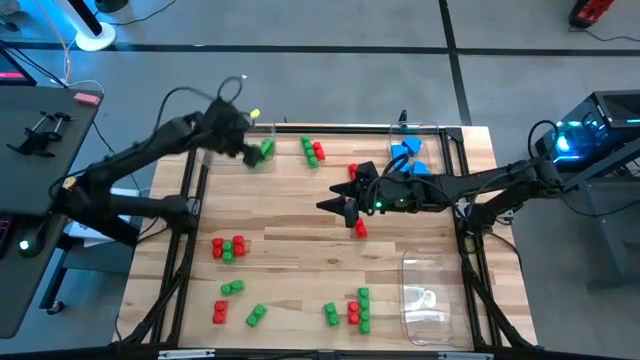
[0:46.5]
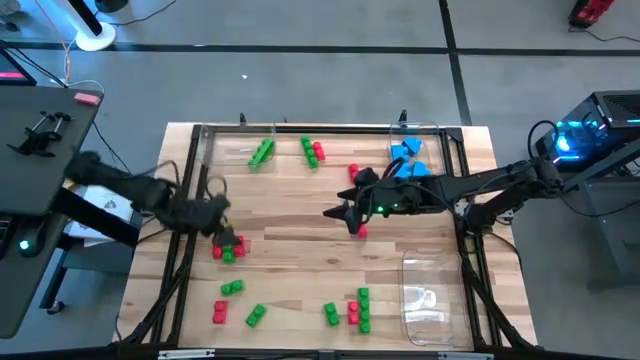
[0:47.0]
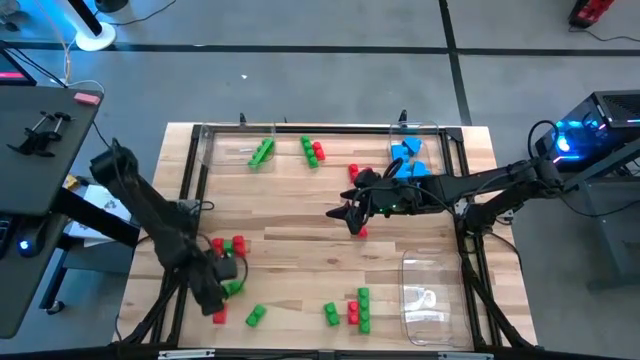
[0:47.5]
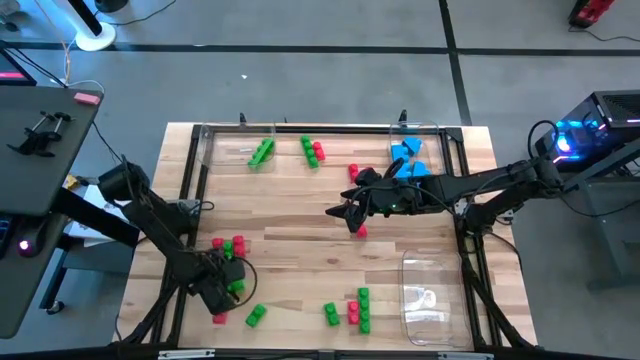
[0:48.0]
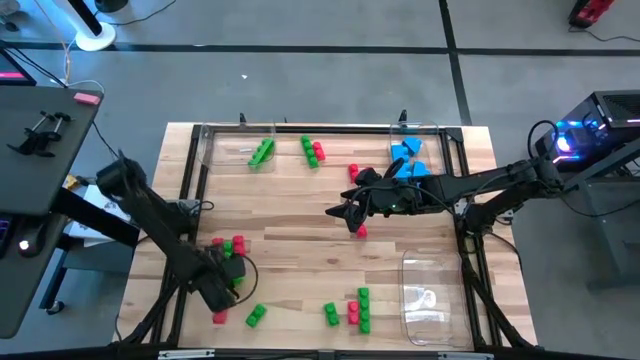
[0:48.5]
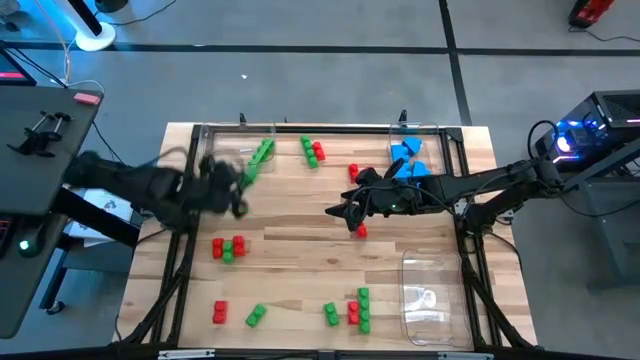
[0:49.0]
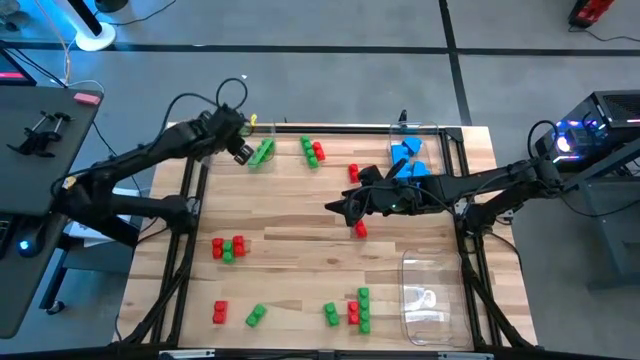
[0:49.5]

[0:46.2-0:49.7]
Task: Sort blocks
Put the green game piece into the top left transparent bin

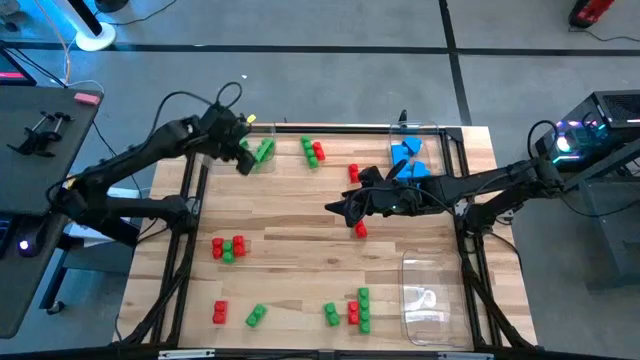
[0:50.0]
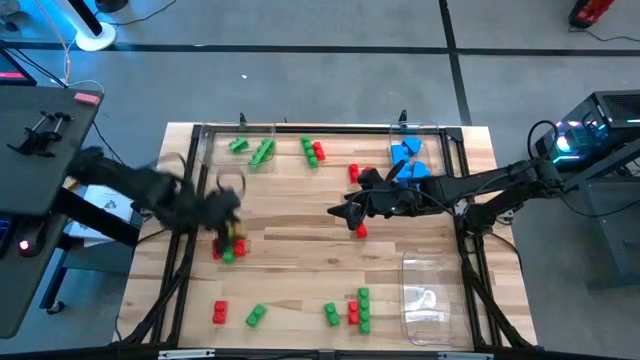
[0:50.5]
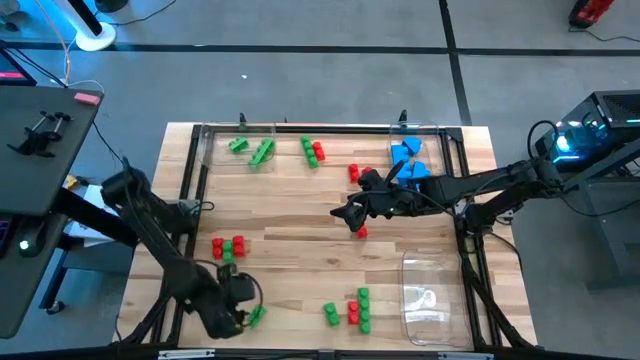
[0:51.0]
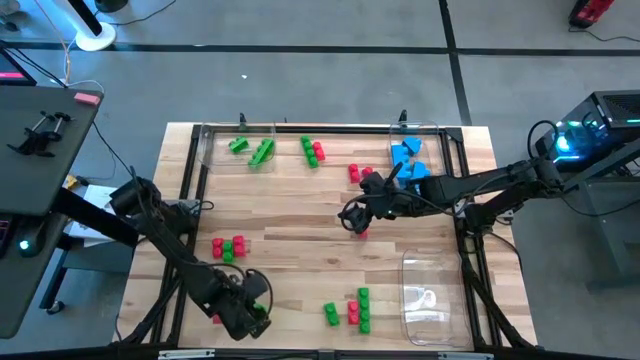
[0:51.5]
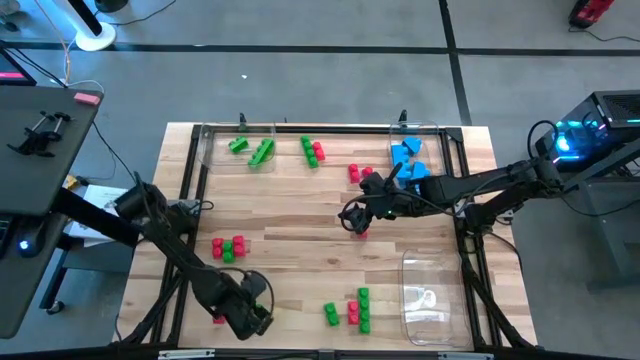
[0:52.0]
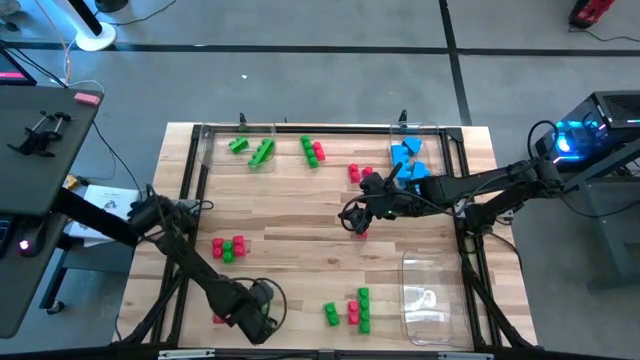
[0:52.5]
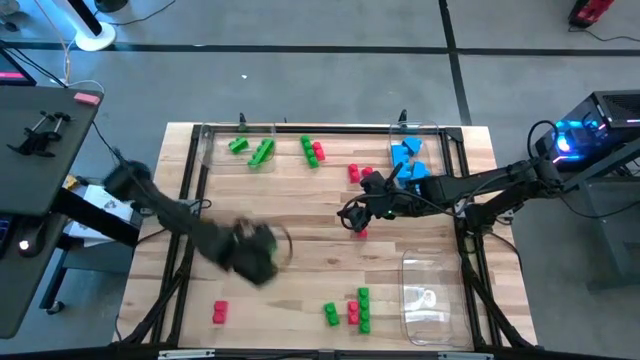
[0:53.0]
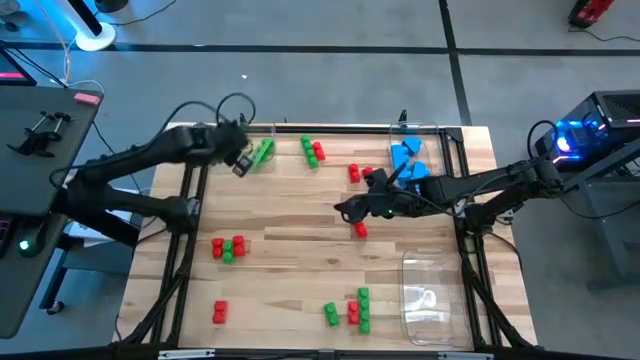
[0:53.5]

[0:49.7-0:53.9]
Put the green game piece into the top left transparent bin

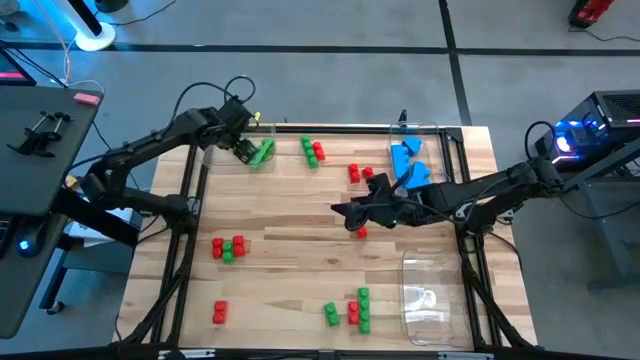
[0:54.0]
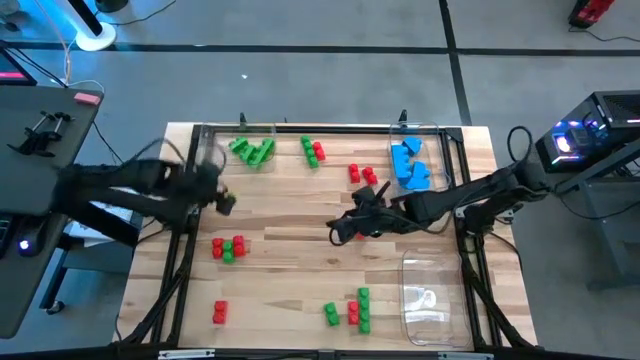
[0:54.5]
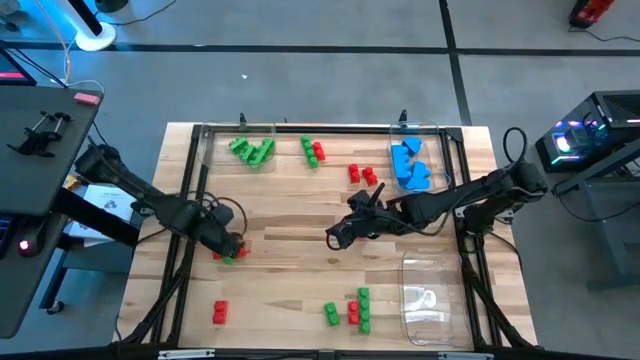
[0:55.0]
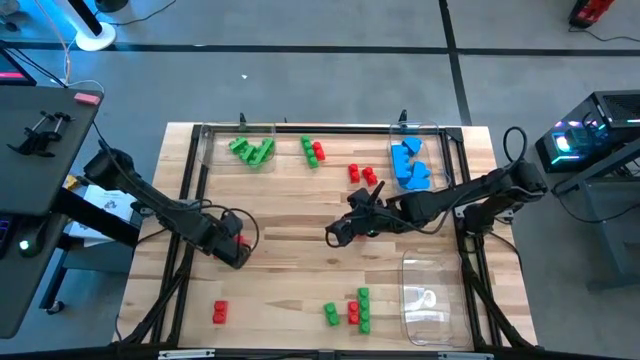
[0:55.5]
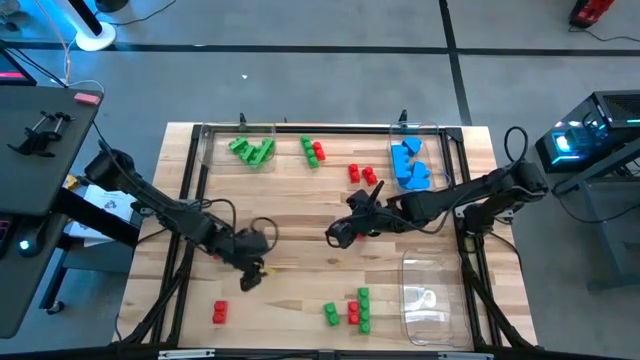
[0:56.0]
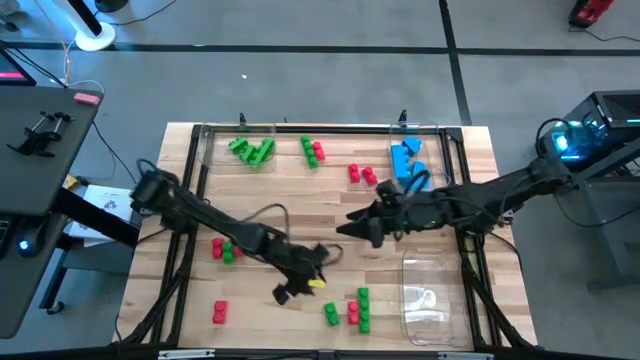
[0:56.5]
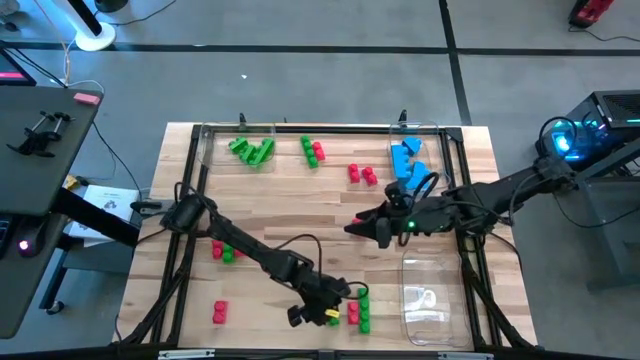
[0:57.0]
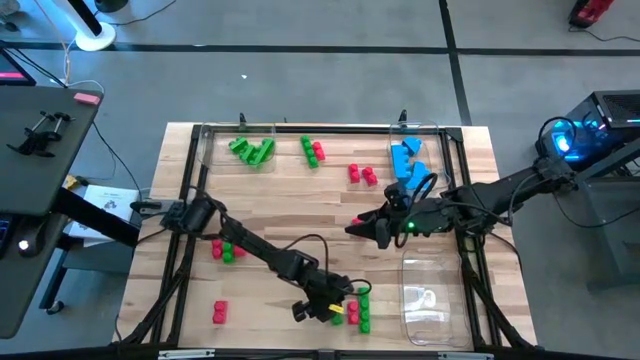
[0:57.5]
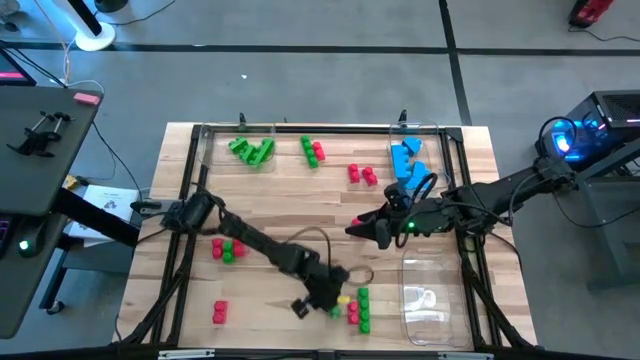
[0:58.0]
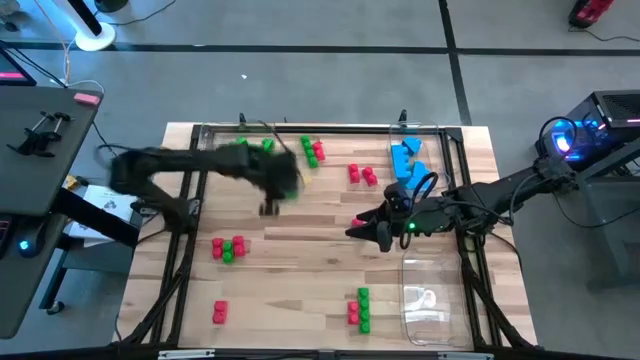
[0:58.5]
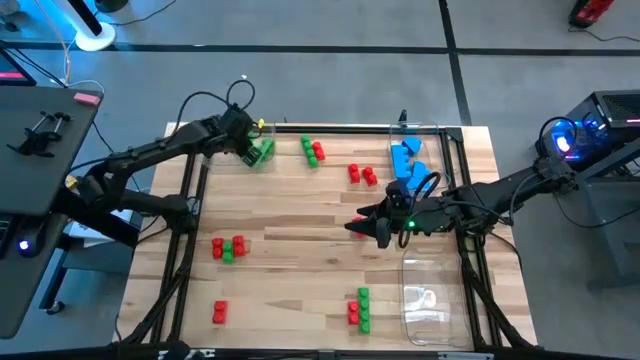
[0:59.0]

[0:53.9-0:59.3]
Put the green game piece into the top left transparent bin

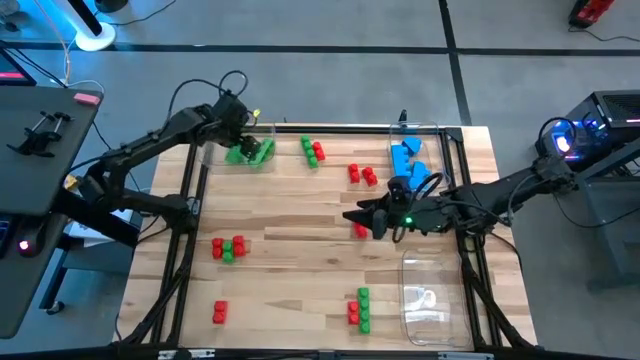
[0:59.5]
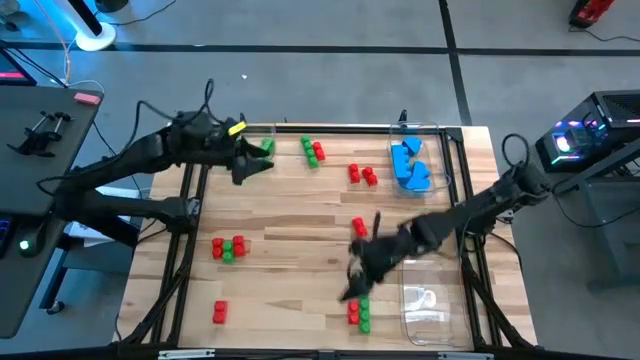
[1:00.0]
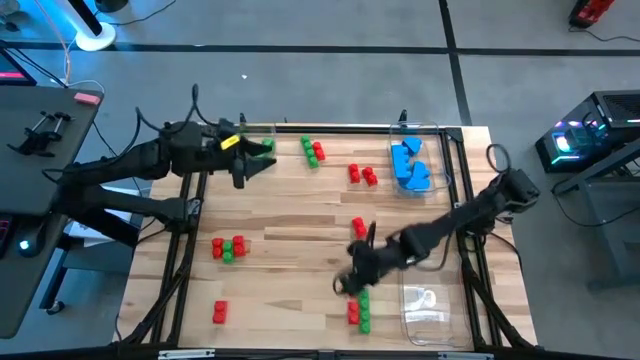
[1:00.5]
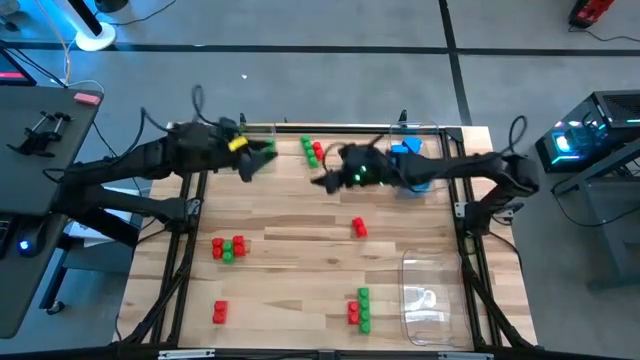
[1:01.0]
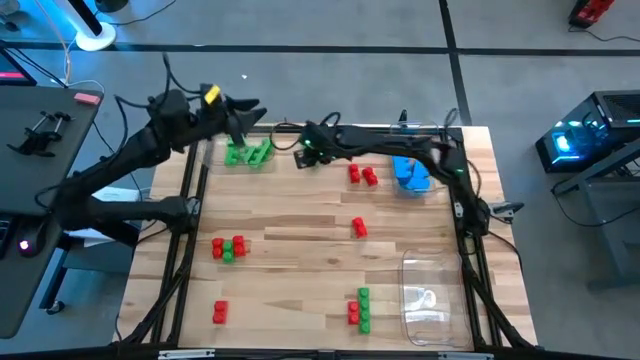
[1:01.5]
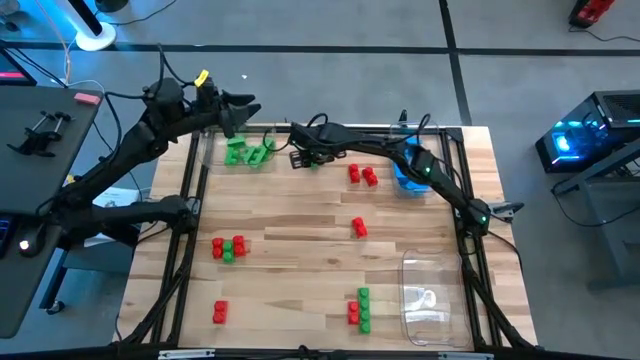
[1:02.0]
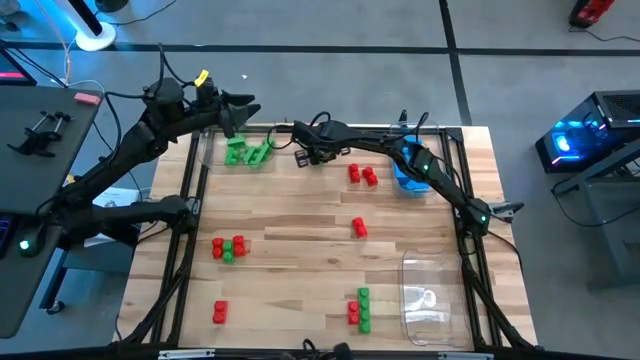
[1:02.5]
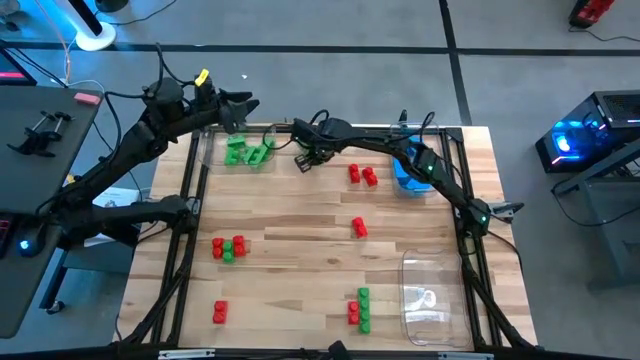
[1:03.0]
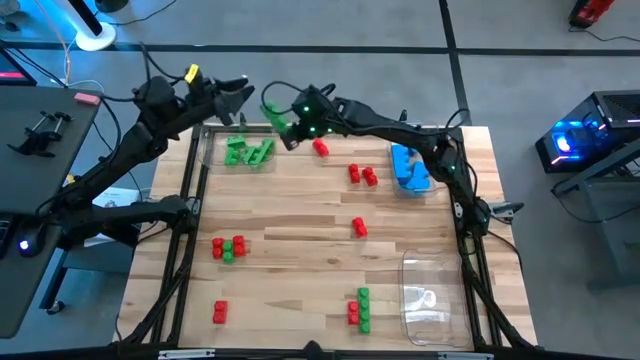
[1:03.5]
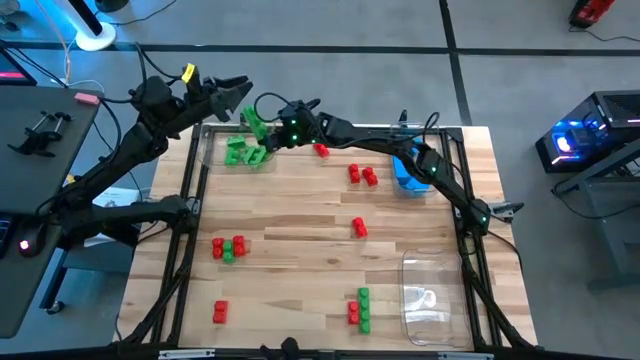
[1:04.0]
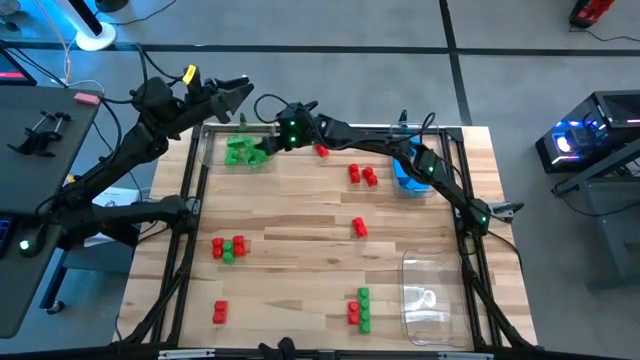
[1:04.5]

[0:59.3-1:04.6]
Put the green game piece into the top left transparent bin

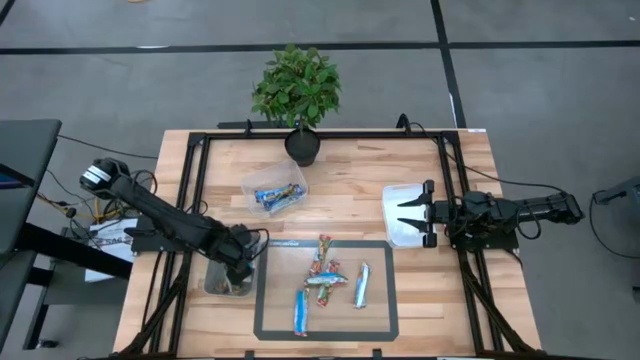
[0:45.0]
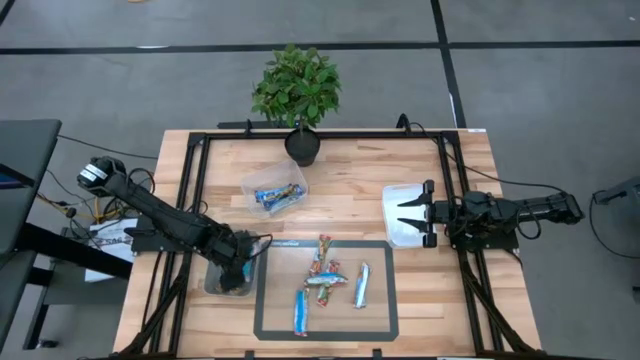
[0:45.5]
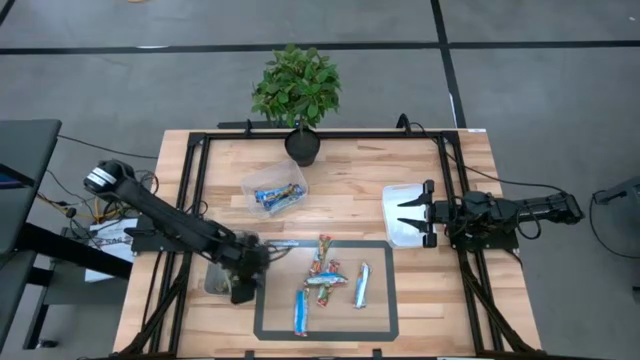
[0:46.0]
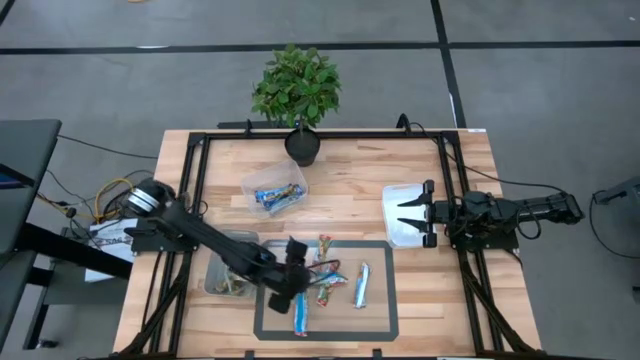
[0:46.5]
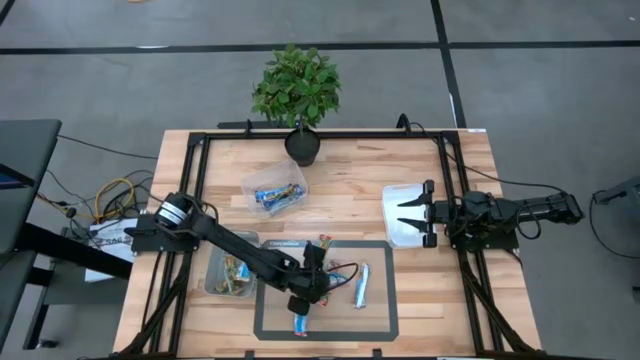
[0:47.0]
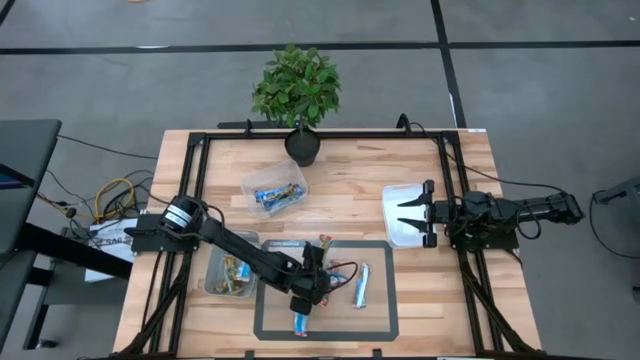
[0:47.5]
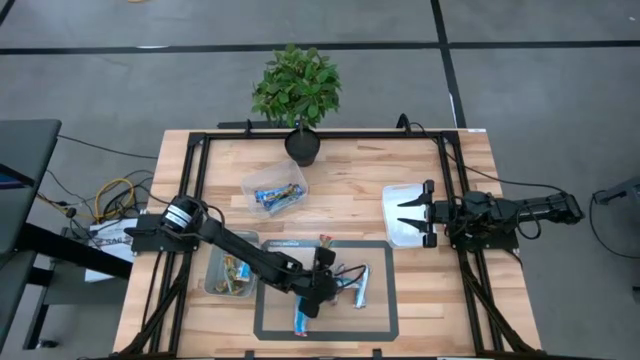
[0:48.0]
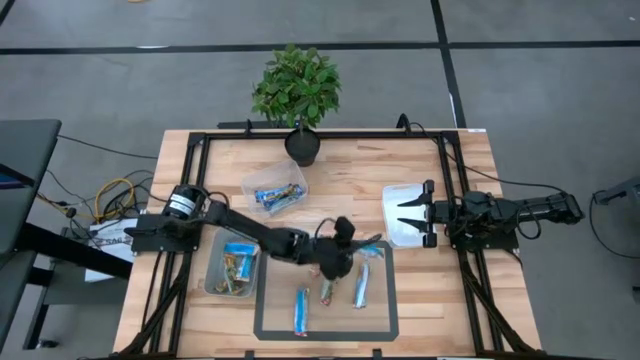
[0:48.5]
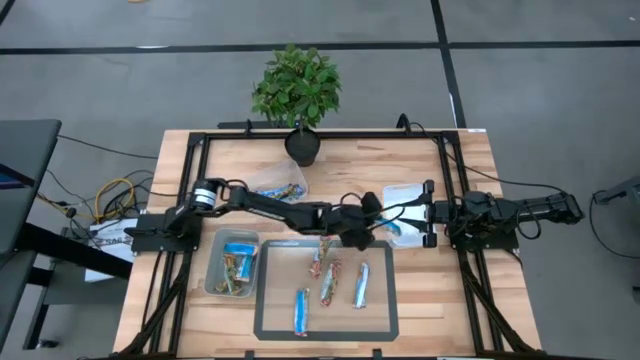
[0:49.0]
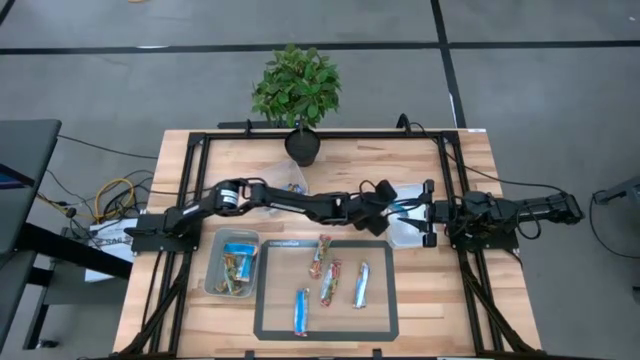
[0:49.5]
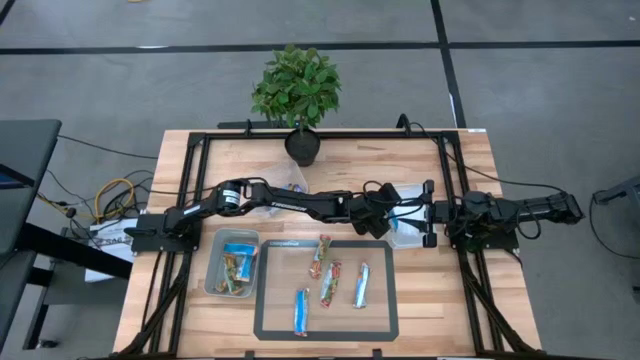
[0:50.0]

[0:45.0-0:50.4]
Task: Pick and place Granola Bars by type
Put the red granola bar into the white bin
